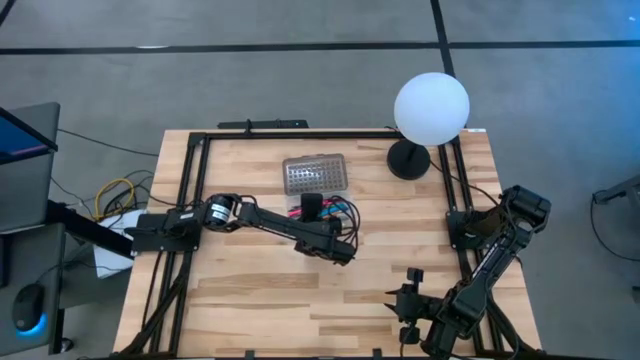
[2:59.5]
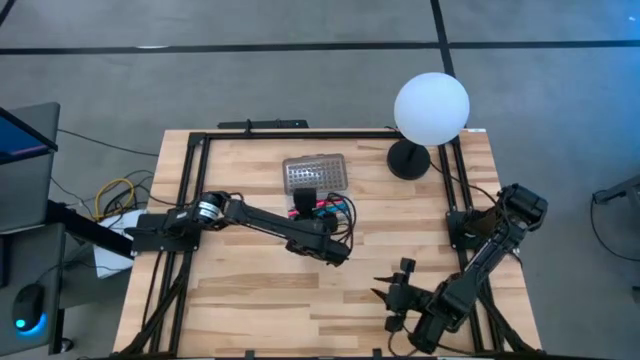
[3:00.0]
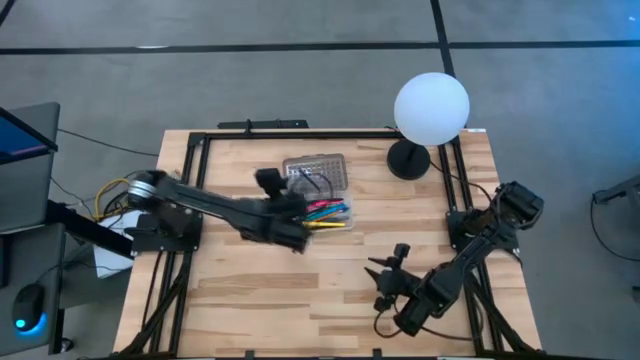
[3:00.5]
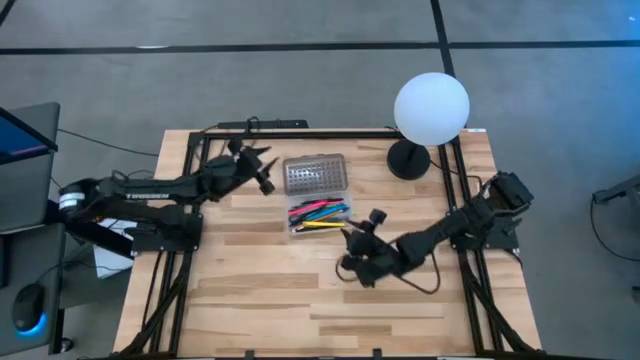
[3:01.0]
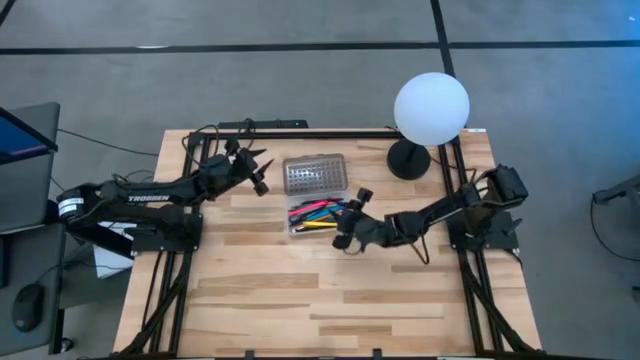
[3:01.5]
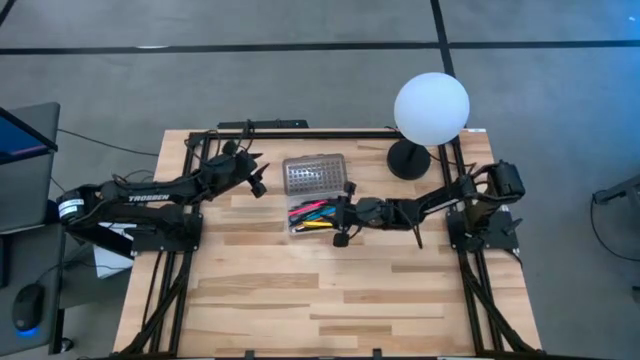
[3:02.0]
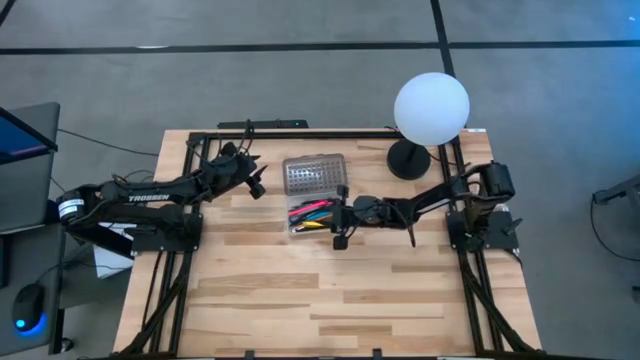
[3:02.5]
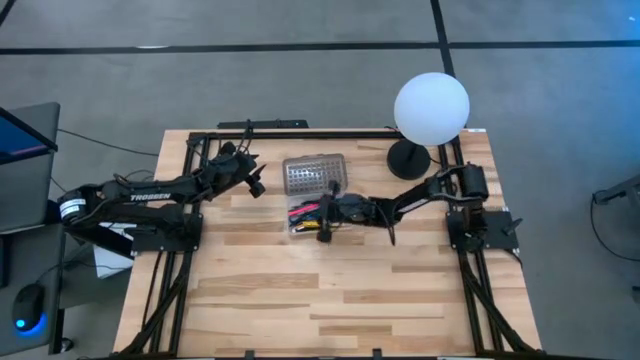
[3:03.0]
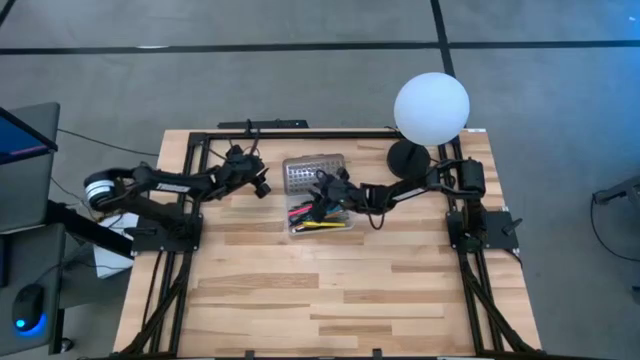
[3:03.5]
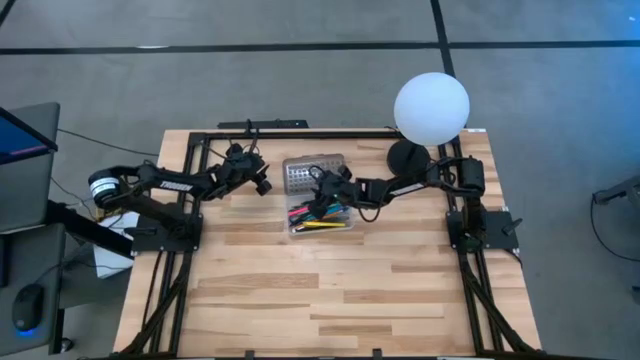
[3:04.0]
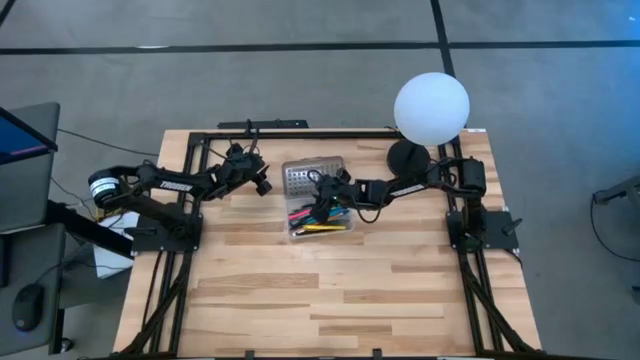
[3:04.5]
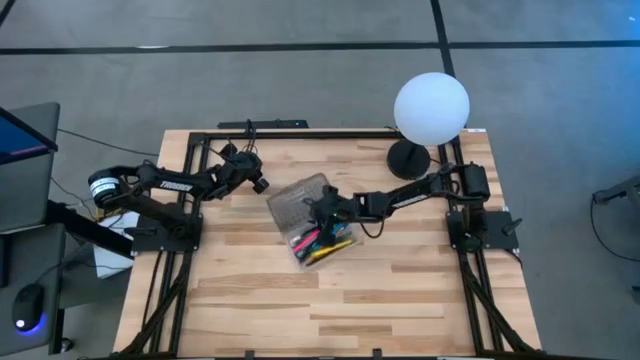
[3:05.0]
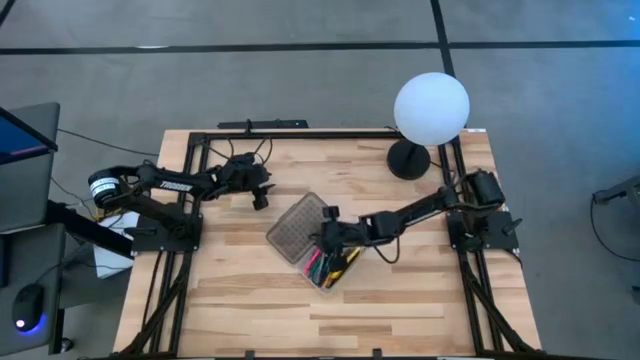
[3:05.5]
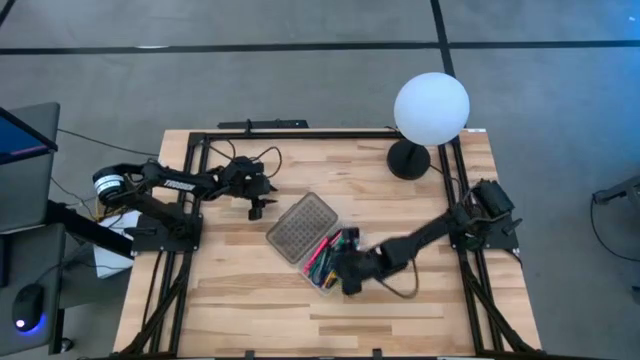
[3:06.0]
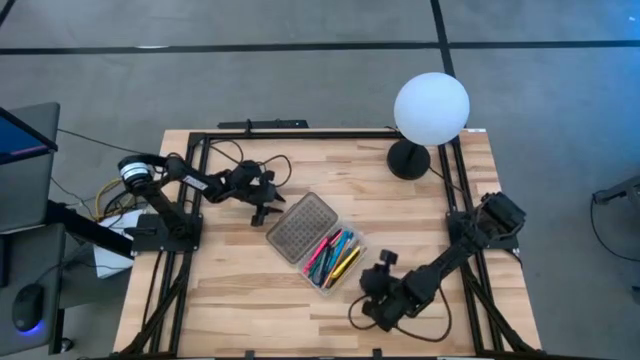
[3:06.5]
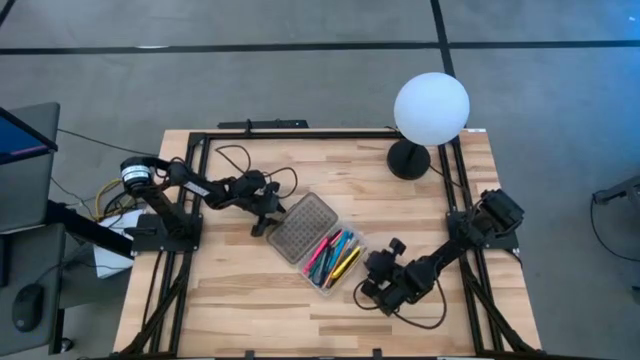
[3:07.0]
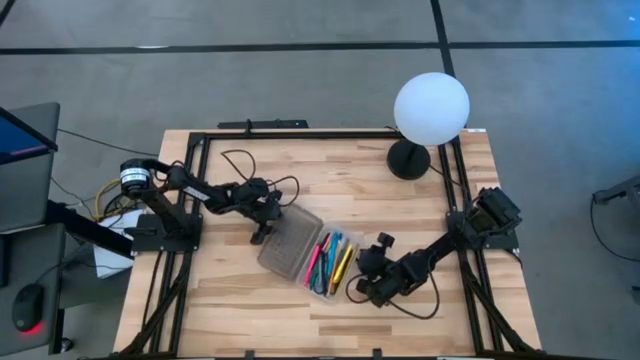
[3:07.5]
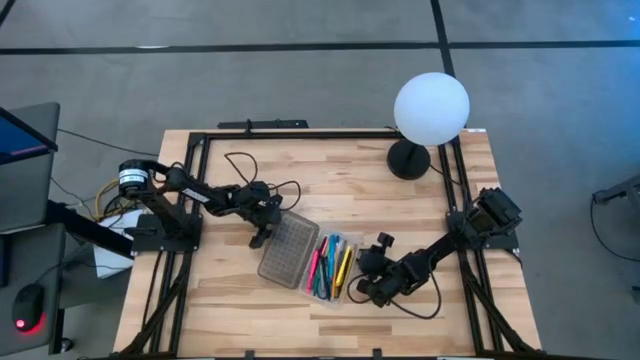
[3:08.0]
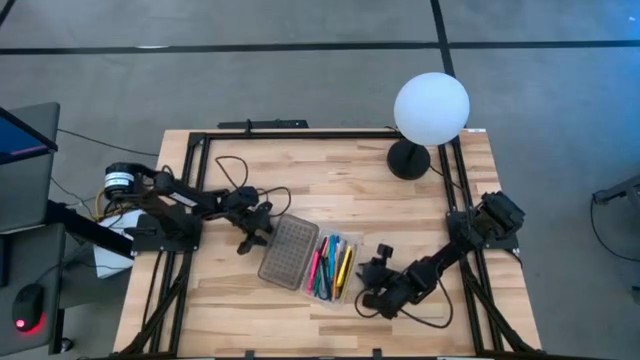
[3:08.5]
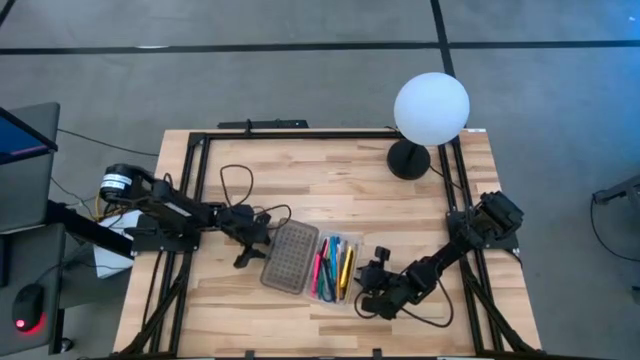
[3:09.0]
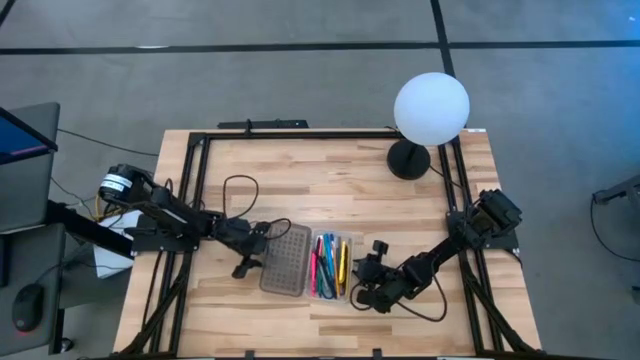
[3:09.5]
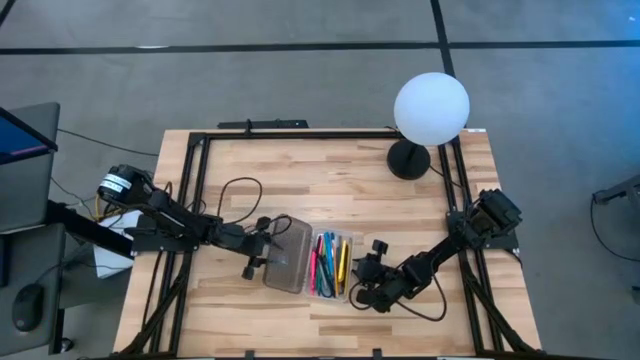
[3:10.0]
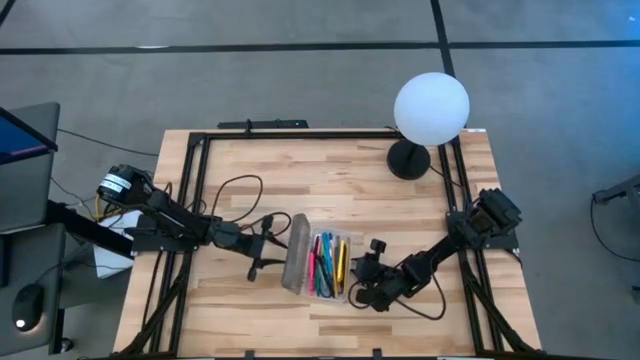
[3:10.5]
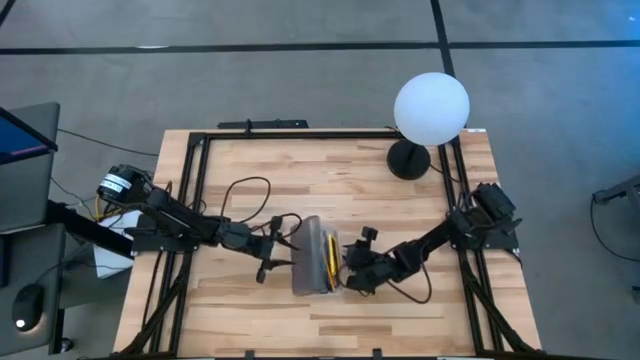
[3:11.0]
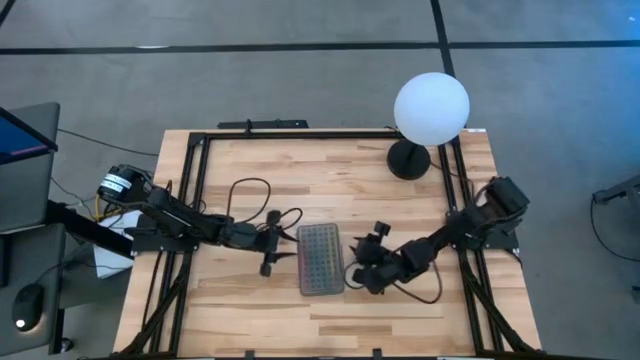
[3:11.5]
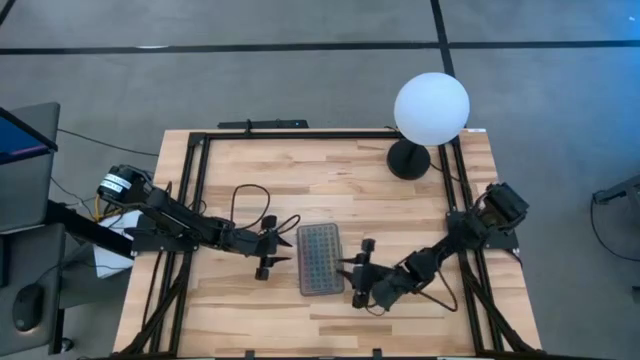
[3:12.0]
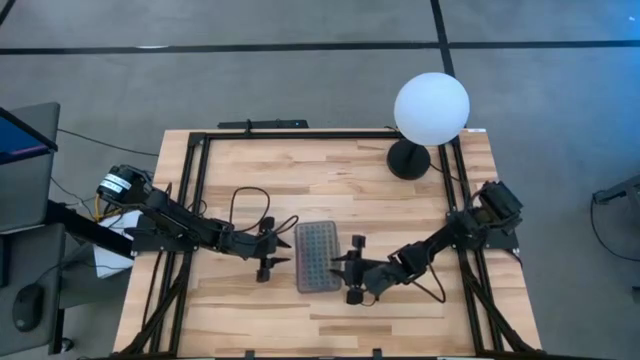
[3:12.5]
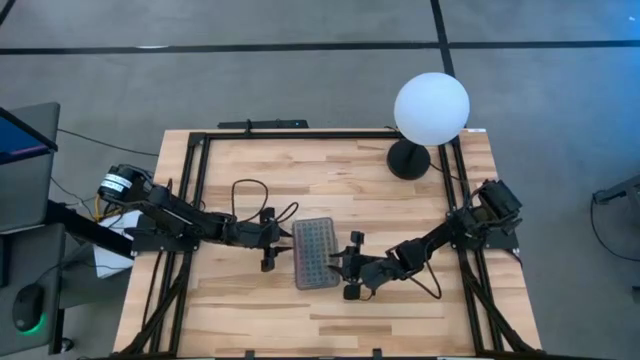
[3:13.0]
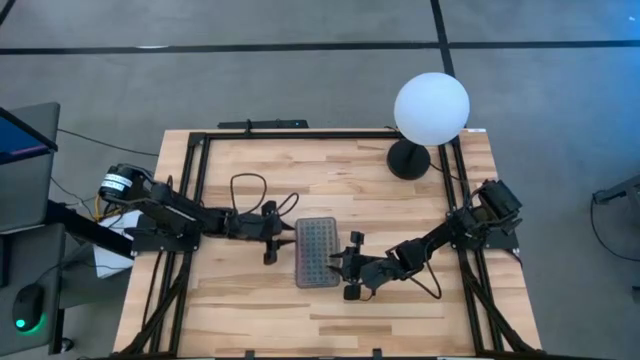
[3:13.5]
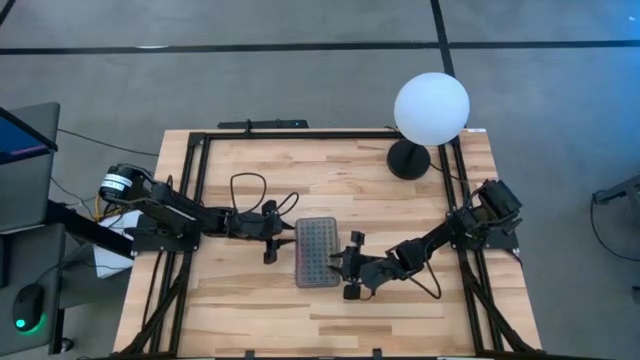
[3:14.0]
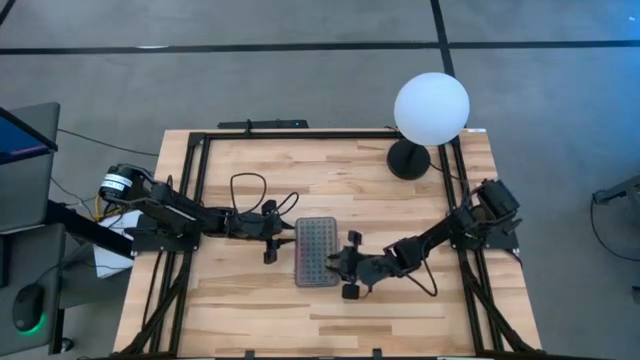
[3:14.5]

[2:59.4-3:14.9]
Task: Pick & place school supplies into a supply box
Close the gray supply box

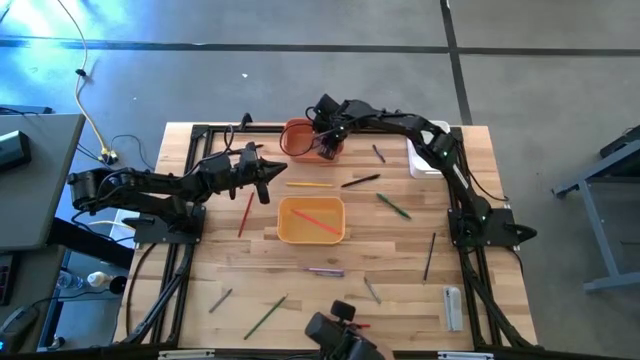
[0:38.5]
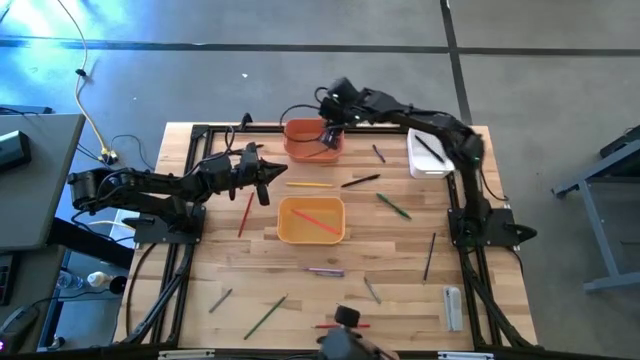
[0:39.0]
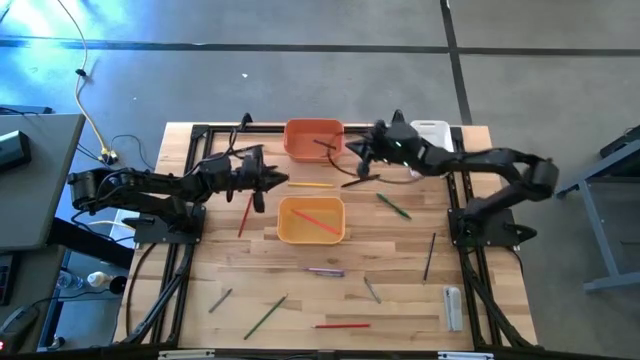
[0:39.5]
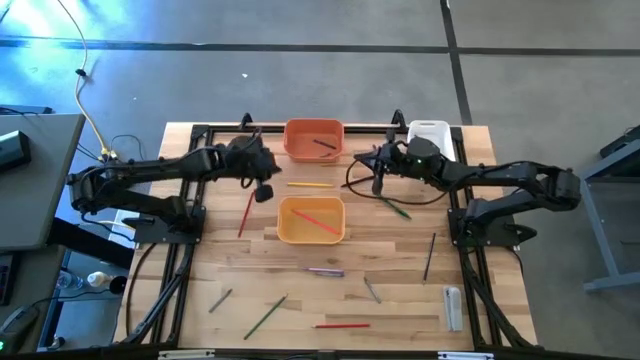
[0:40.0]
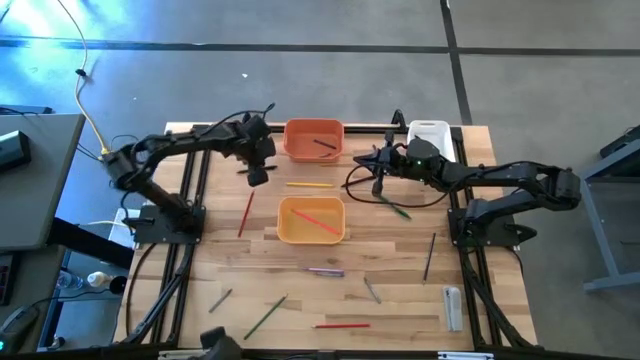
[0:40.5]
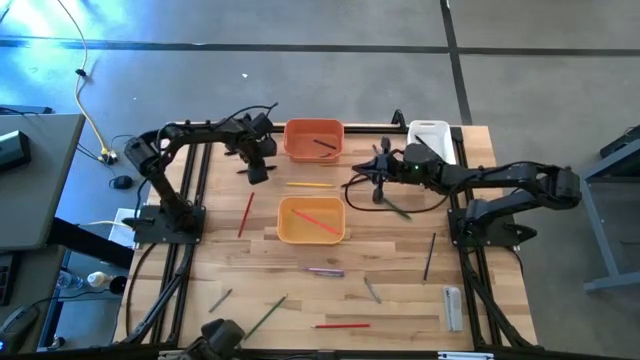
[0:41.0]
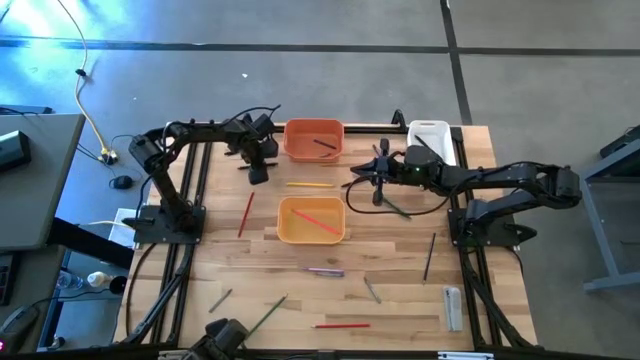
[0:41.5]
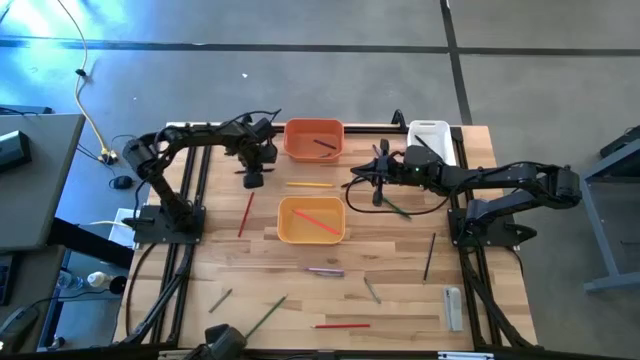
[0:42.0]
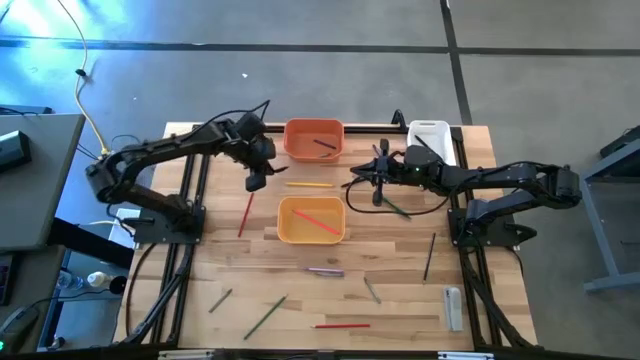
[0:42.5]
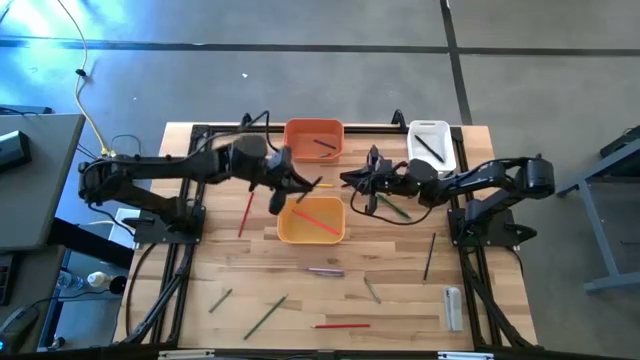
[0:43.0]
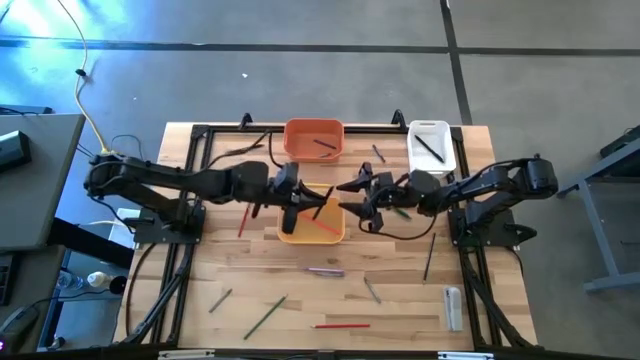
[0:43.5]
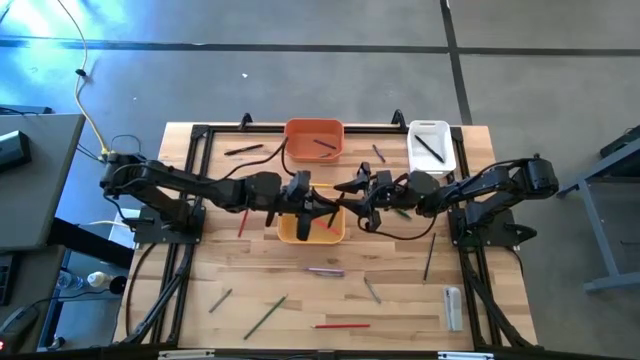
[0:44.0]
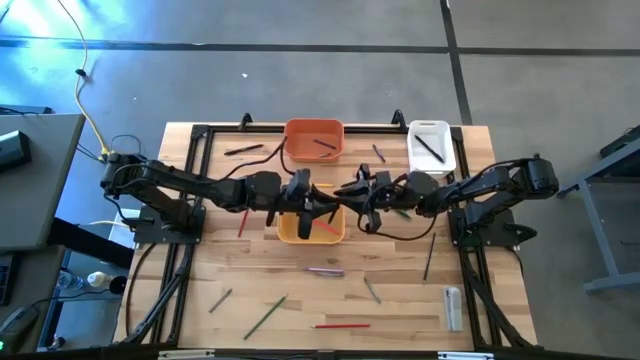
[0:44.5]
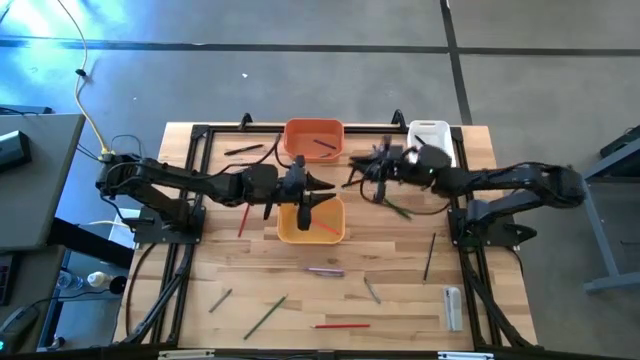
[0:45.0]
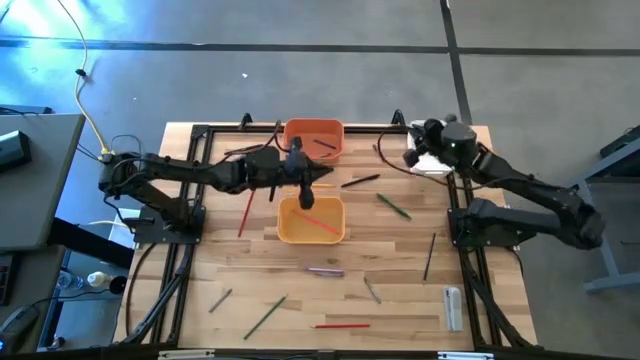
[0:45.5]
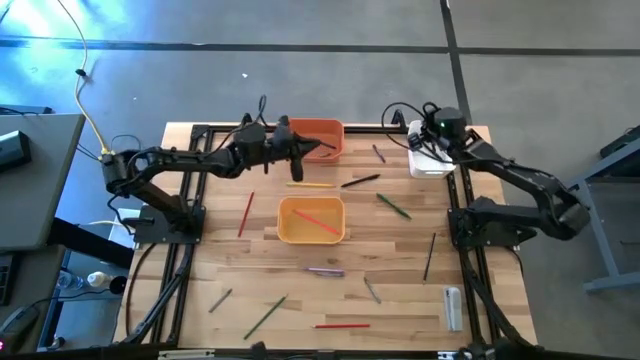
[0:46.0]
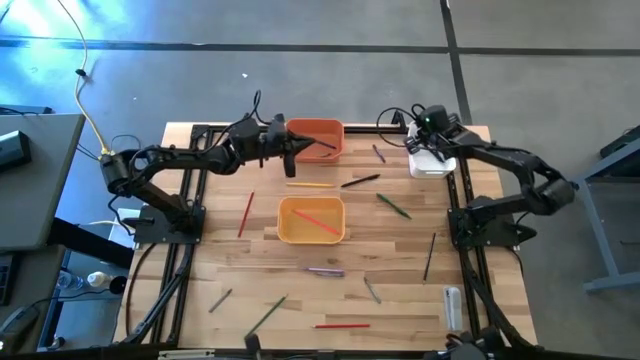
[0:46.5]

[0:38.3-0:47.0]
Task: Sort crayons/erasers/pens/pencils in bins
Put the bottom left black pen into the white bin
